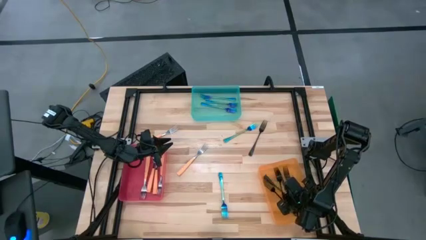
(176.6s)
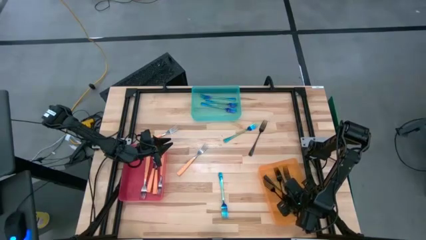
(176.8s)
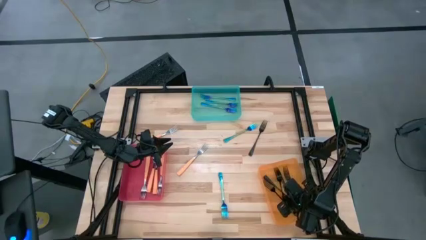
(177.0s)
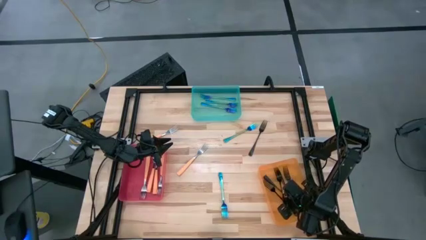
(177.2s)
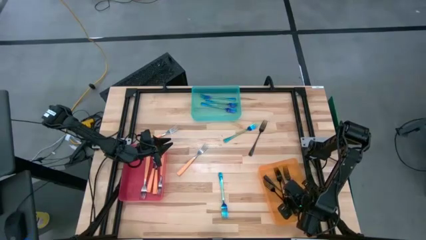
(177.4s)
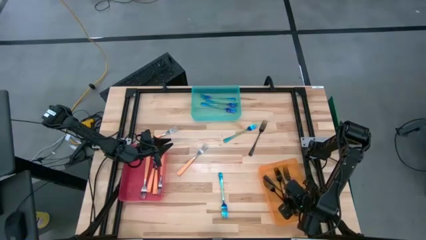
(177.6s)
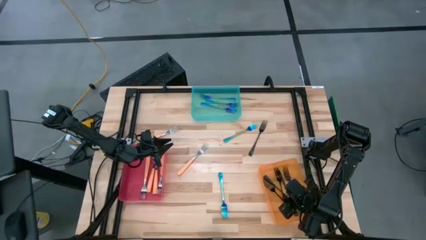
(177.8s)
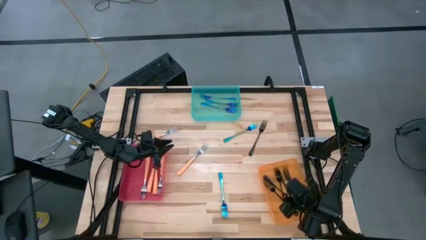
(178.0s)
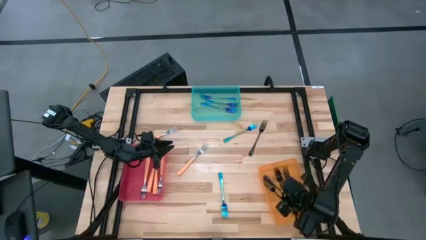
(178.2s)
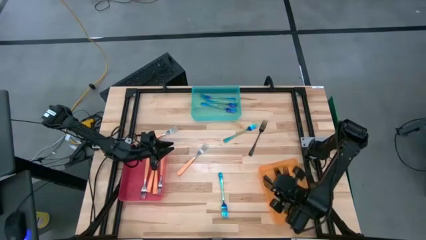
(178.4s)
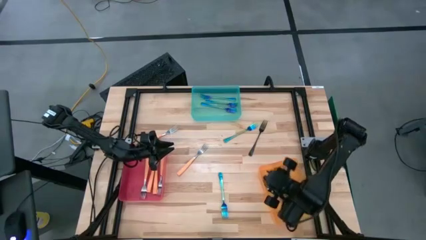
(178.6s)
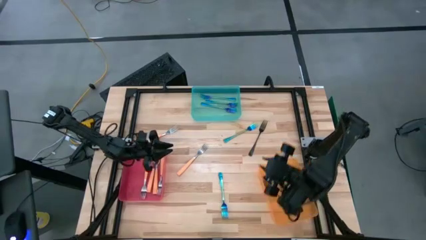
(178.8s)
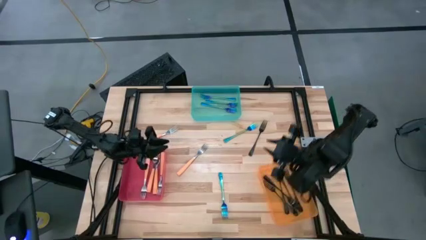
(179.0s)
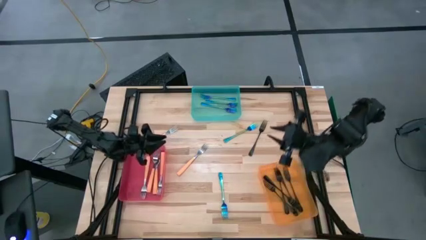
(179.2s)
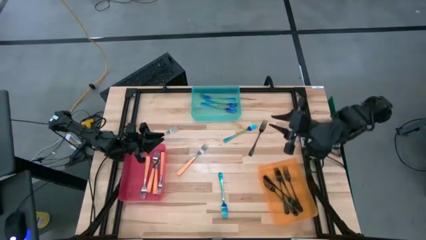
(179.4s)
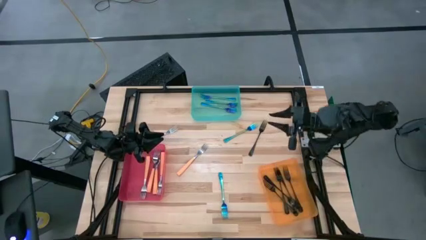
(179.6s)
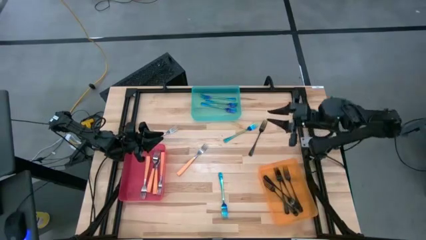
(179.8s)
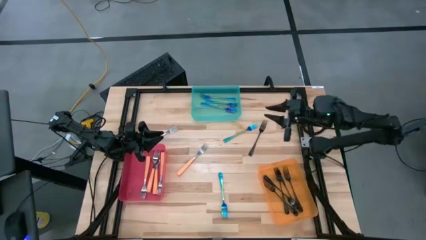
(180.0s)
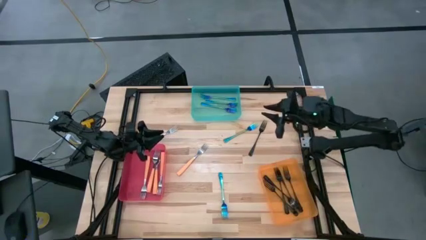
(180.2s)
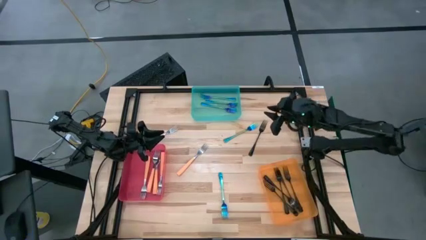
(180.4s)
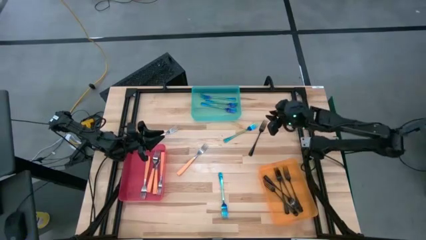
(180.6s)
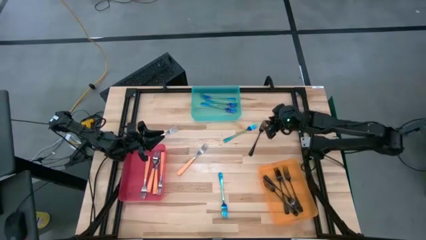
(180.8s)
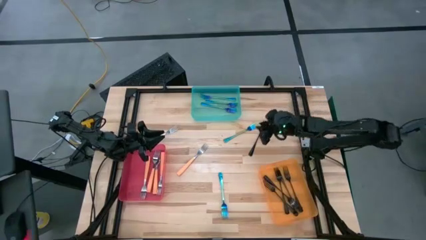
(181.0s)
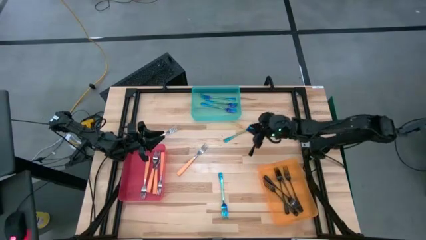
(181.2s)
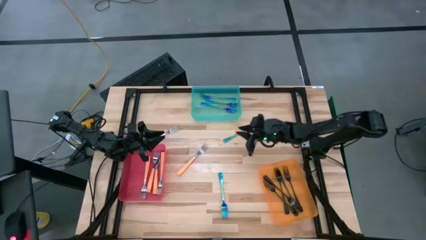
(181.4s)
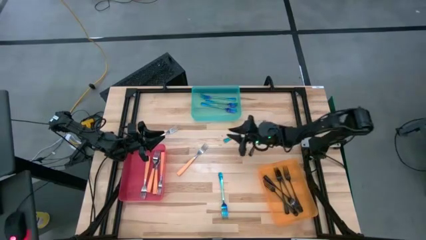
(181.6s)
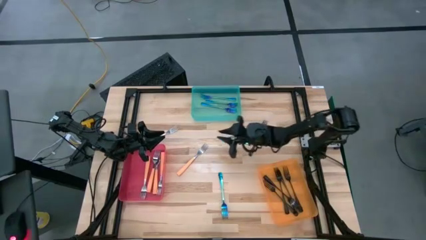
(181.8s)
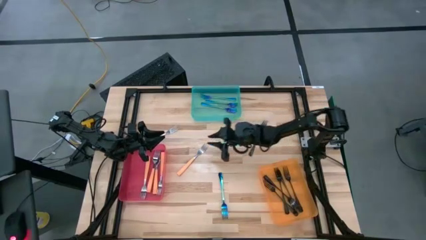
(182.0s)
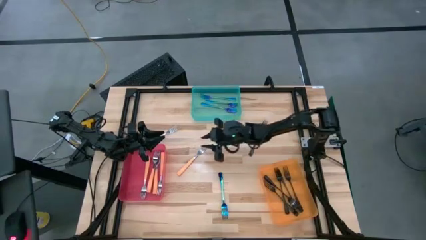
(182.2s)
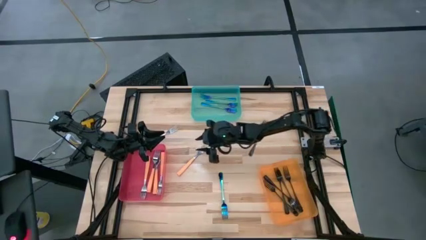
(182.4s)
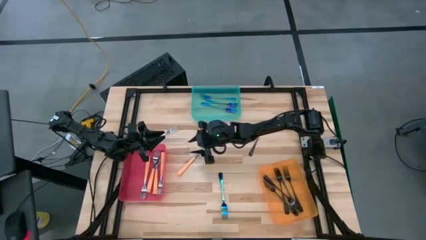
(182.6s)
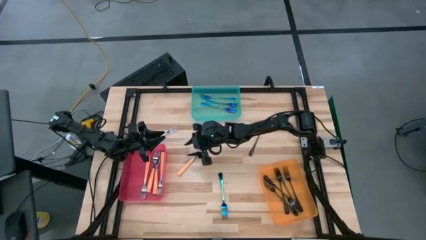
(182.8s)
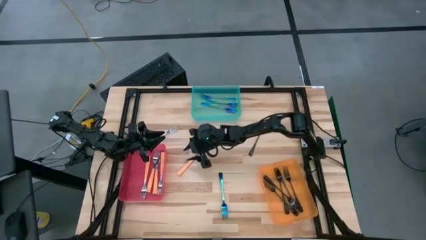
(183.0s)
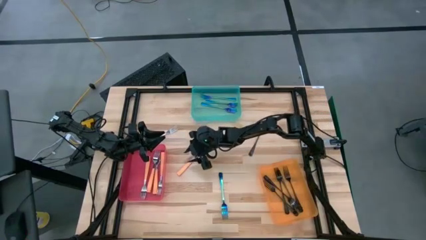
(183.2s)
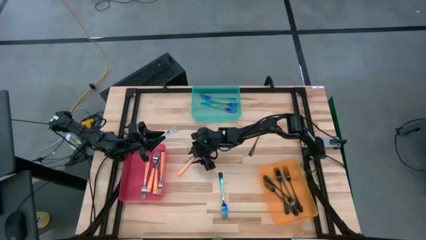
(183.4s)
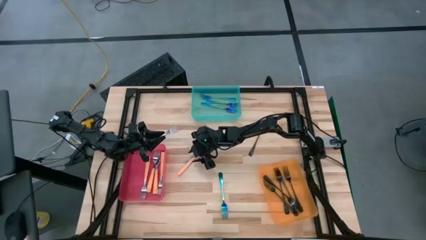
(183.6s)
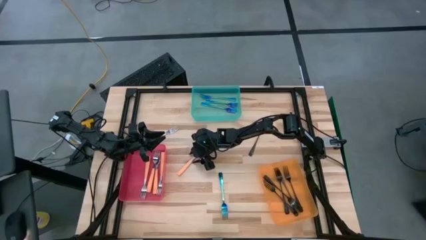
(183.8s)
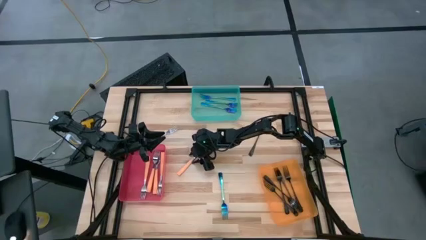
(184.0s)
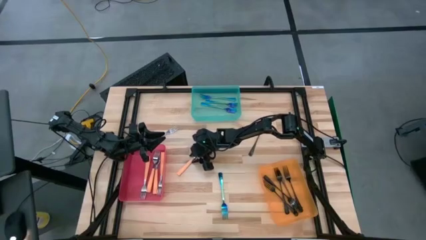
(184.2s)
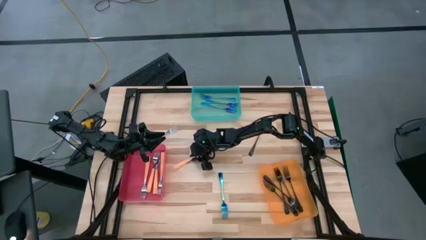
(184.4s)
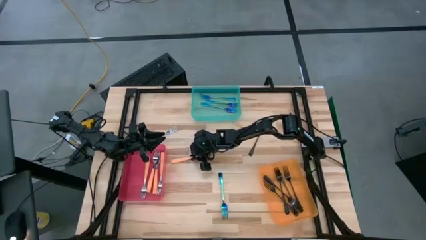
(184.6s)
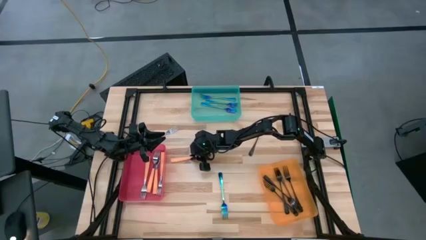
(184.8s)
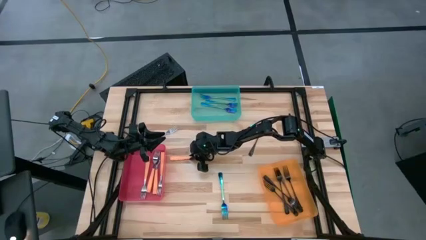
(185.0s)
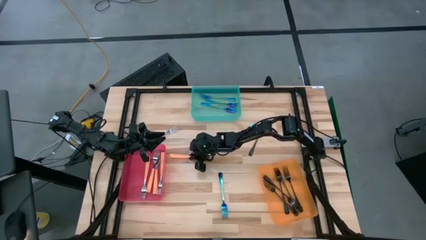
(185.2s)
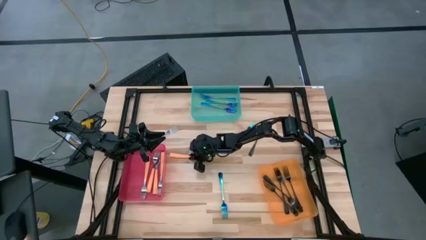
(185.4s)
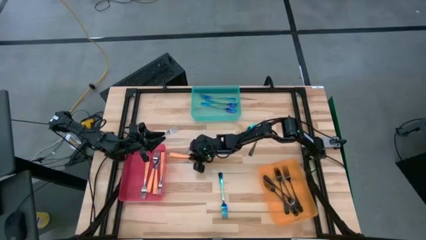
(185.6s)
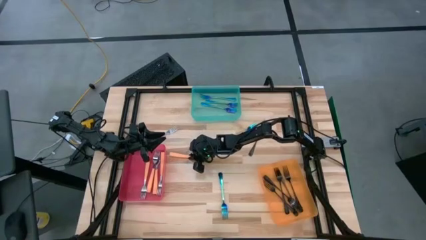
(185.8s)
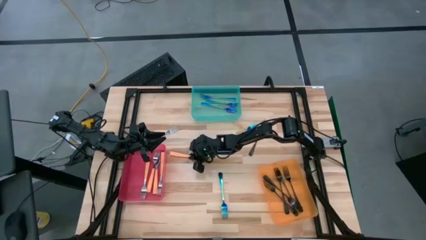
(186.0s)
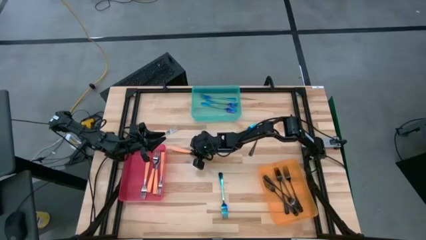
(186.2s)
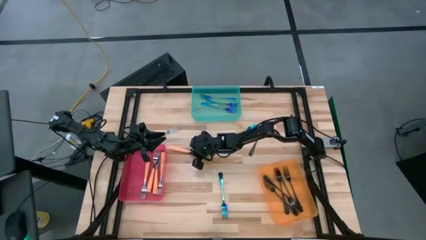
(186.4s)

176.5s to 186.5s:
Task: Sort silverware by color (type)
Put the orange fork into the red bin

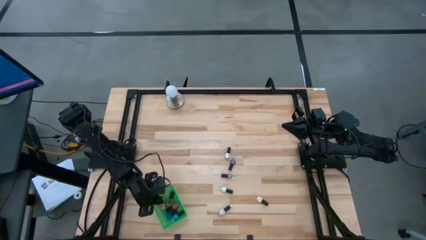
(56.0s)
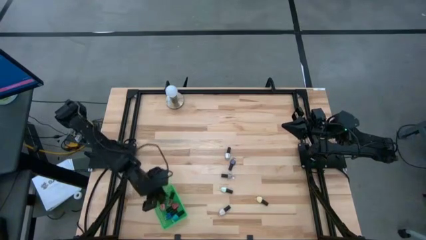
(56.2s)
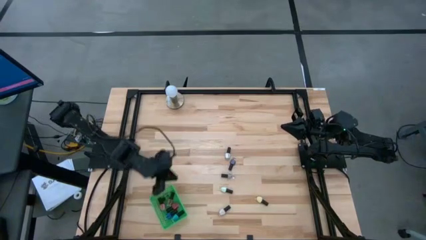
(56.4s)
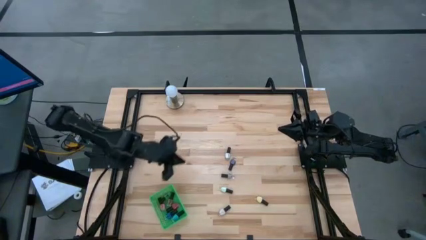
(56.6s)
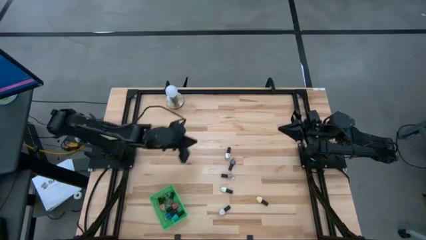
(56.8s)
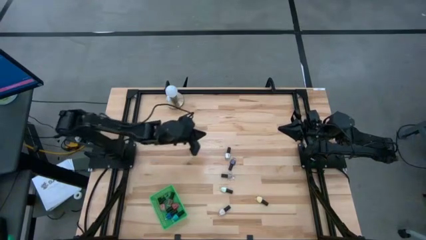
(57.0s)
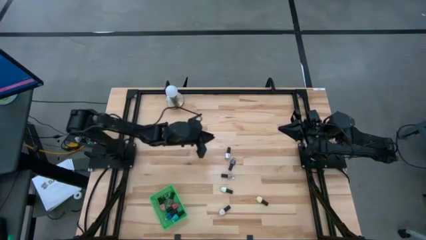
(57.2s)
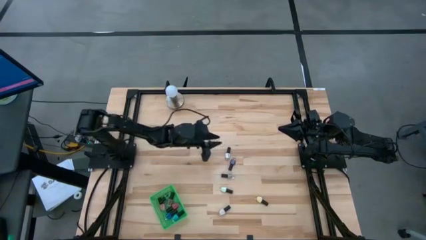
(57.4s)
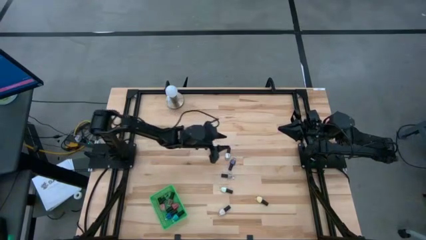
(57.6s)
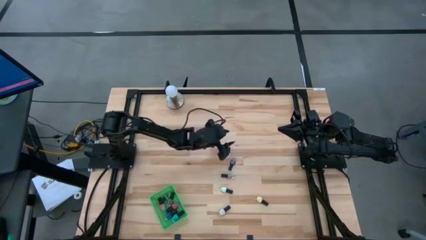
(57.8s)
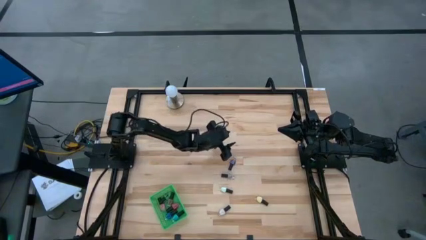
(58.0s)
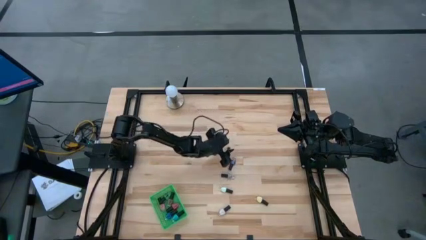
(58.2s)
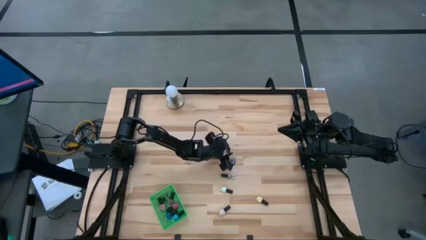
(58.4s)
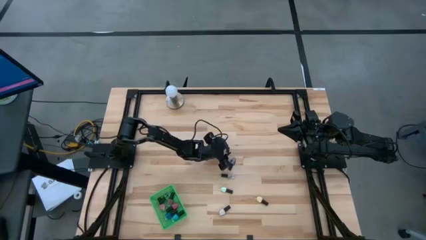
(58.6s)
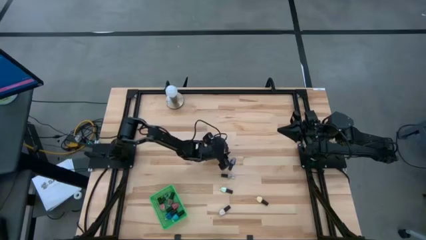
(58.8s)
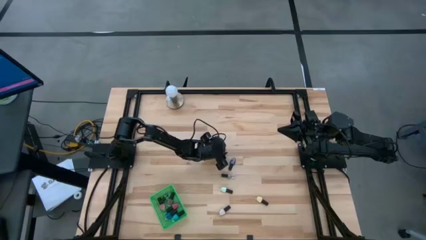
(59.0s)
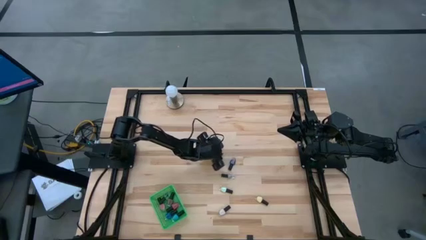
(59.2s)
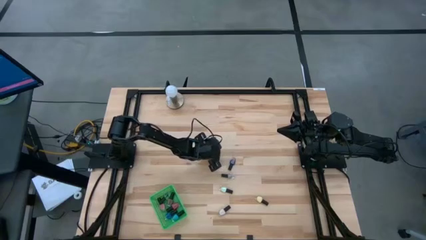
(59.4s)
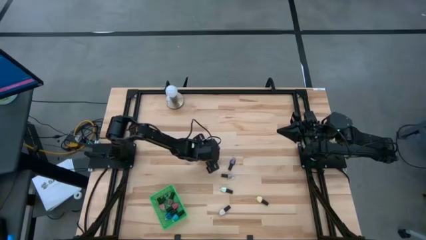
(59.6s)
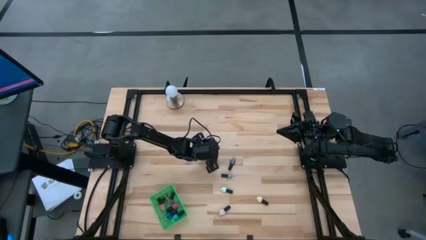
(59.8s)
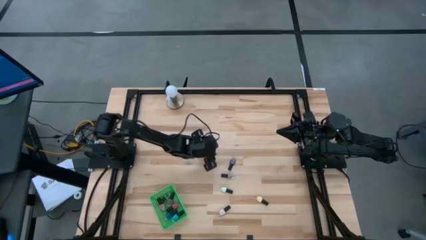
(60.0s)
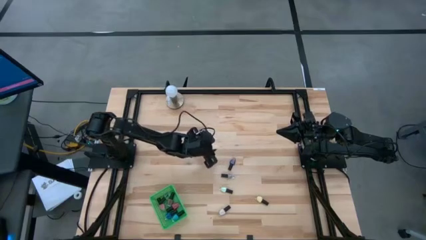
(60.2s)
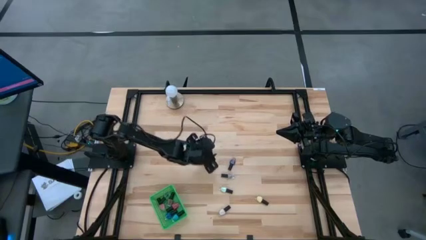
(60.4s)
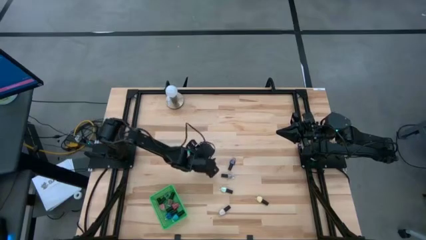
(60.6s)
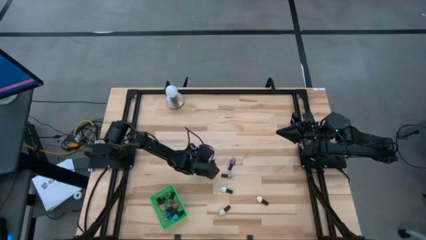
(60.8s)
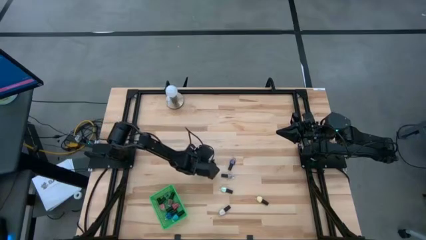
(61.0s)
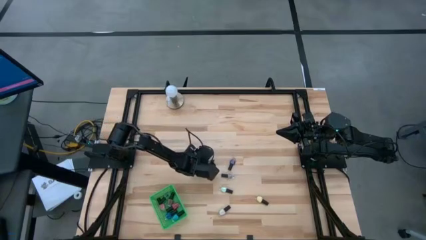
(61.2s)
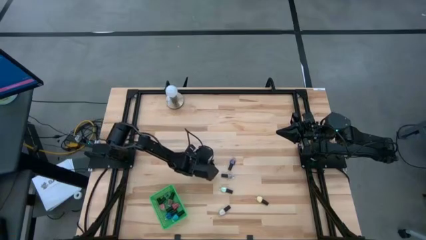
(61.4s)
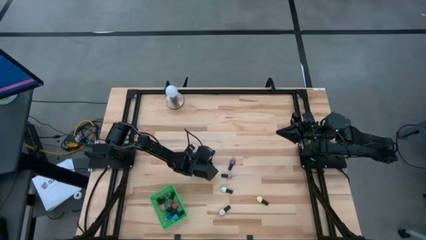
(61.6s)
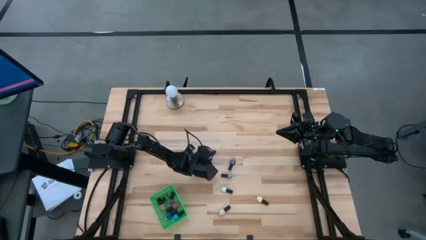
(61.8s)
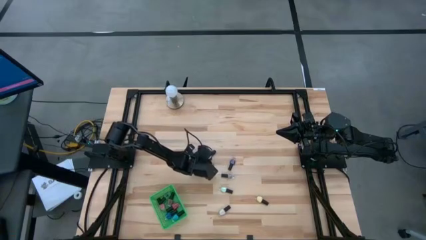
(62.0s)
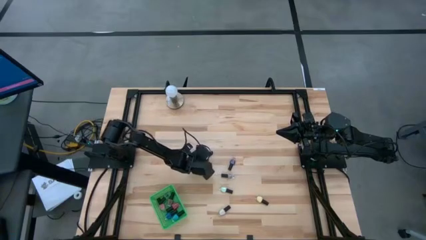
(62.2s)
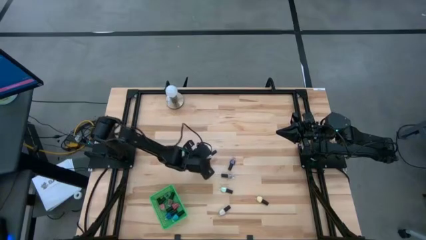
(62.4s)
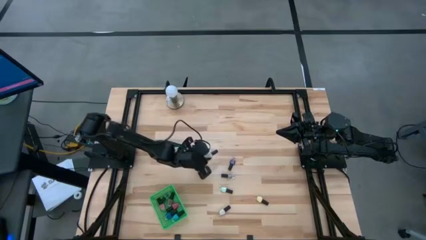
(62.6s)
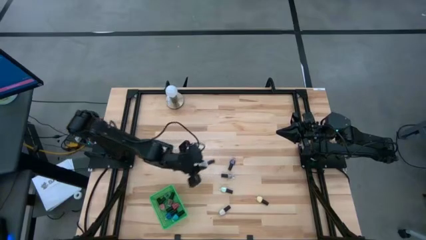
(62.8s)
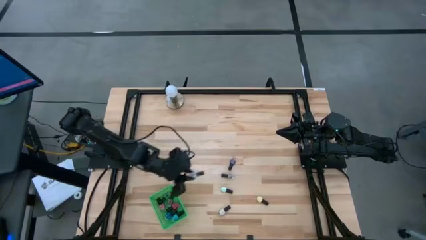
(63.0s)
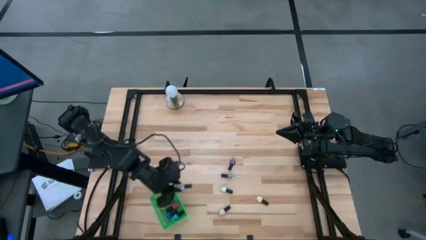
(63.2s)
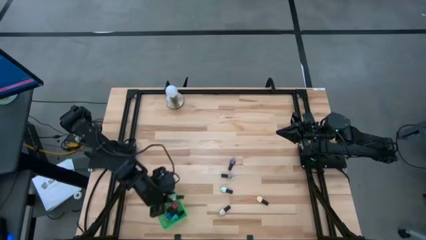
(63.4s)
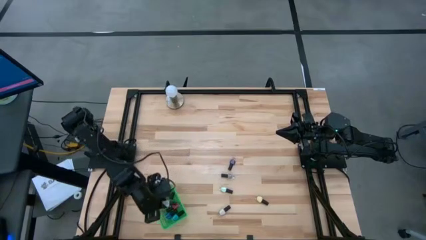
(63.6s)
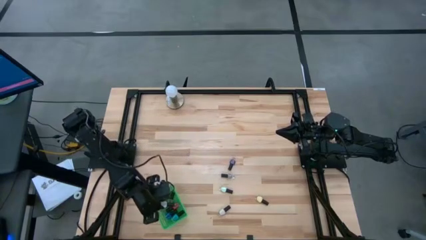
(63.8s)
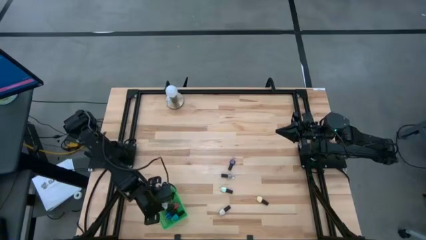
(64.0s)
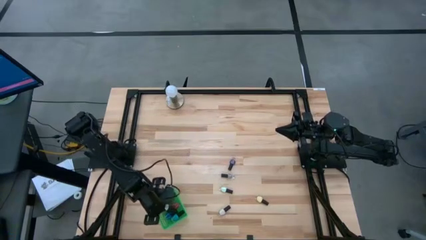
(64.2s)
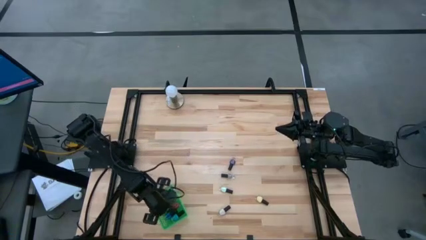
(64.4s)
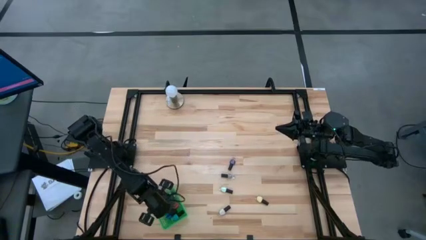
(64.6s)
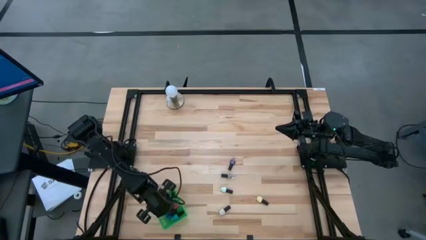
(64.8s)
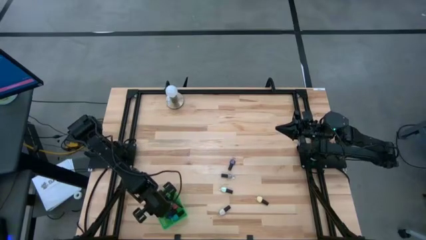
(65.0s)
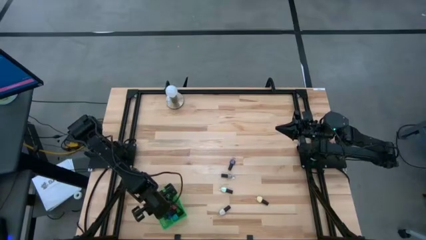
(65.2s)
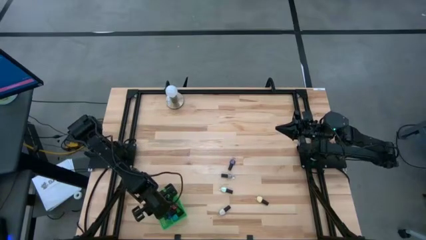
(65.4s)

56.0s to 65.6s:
Task: Pick & Place Nail Polish
Put the black white nail polish bottle into the green basket
